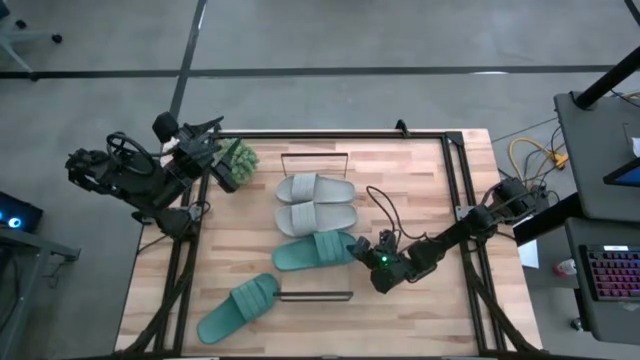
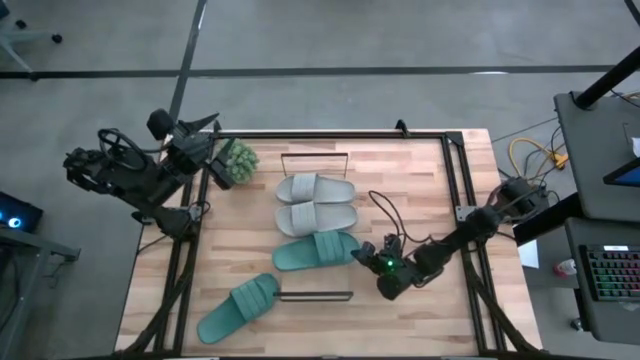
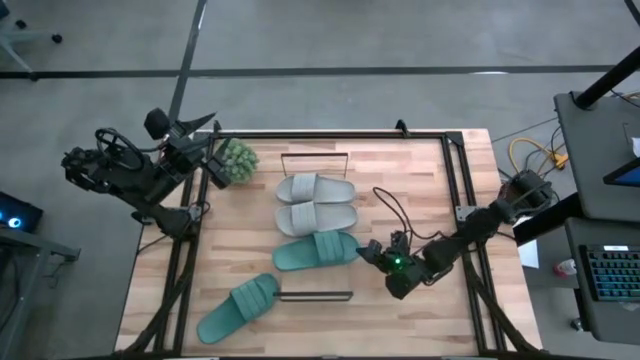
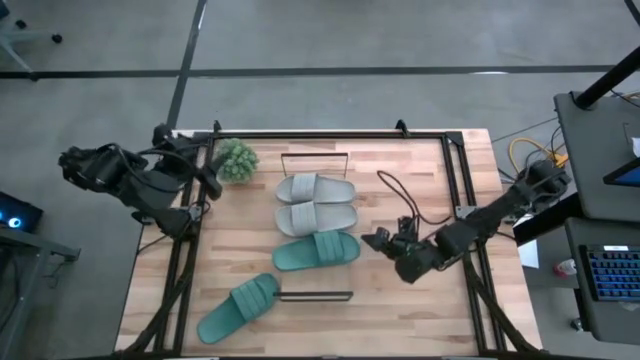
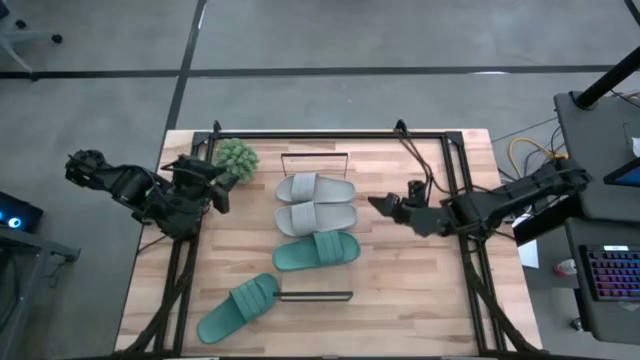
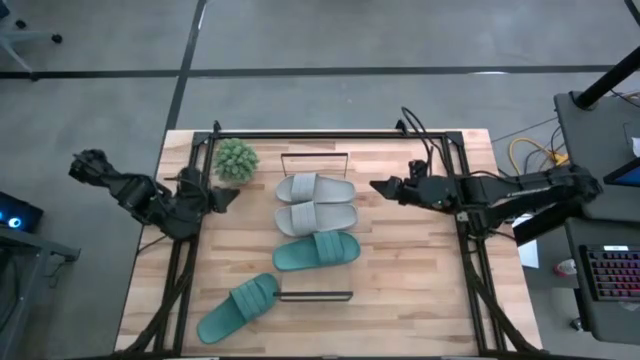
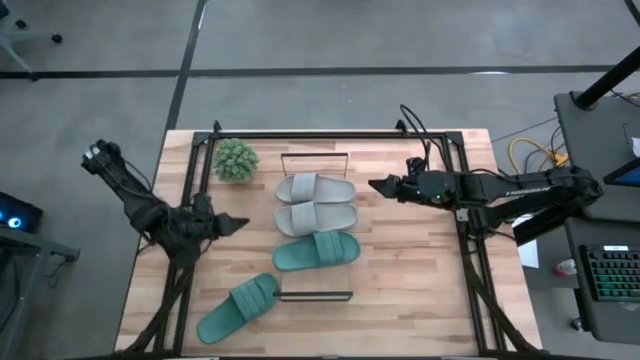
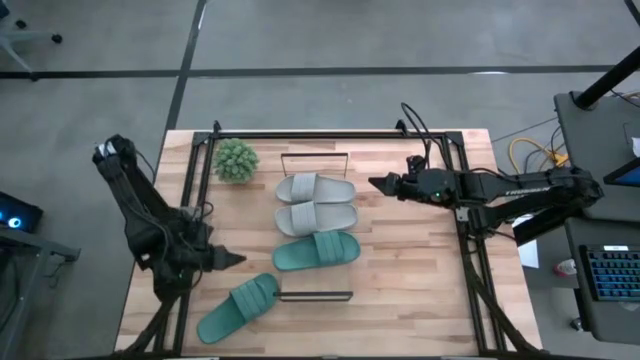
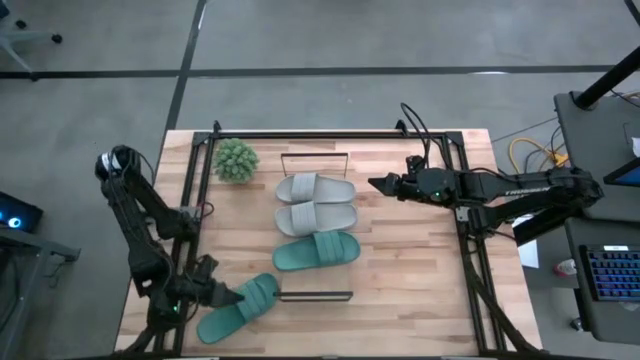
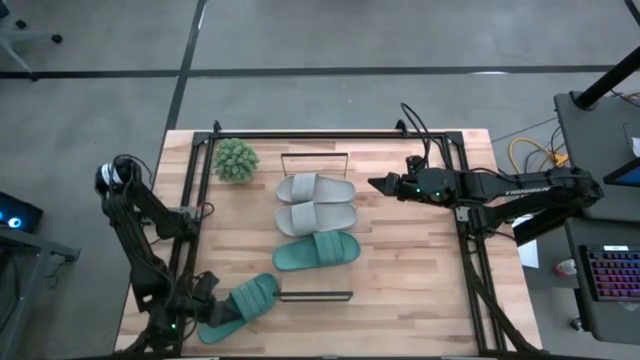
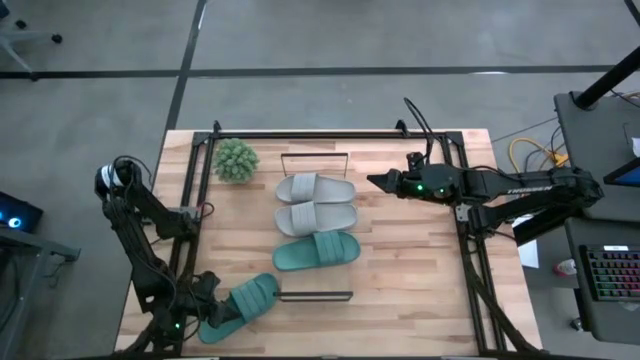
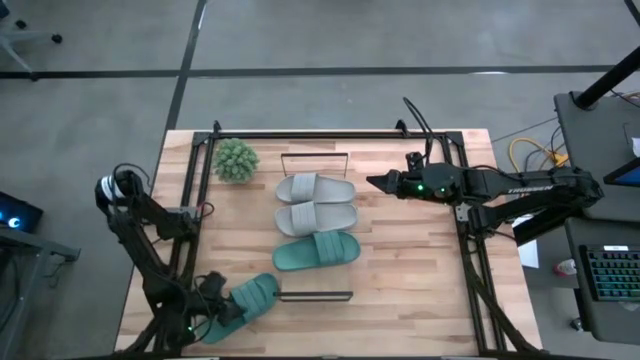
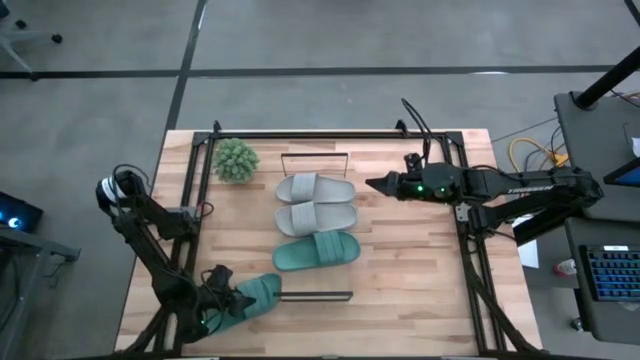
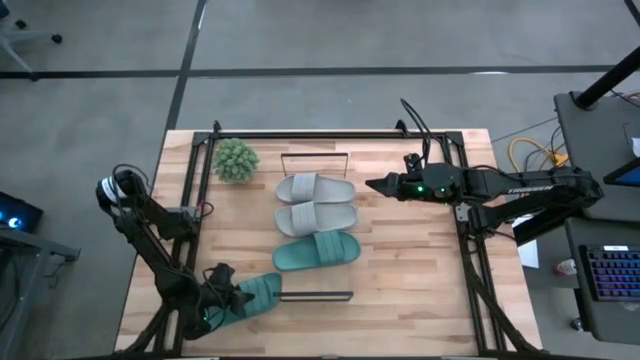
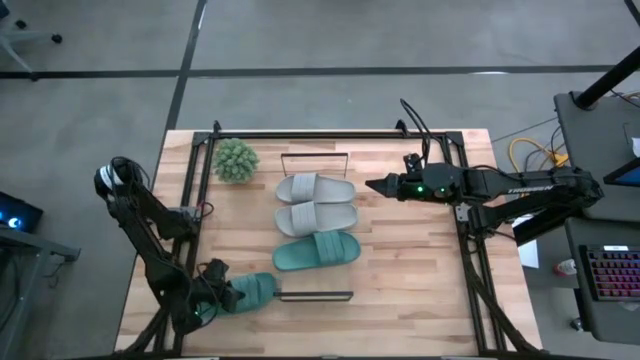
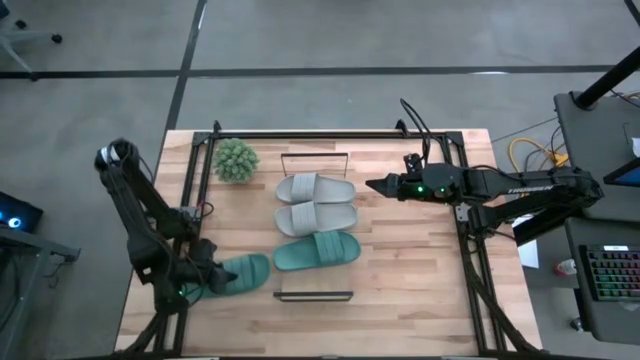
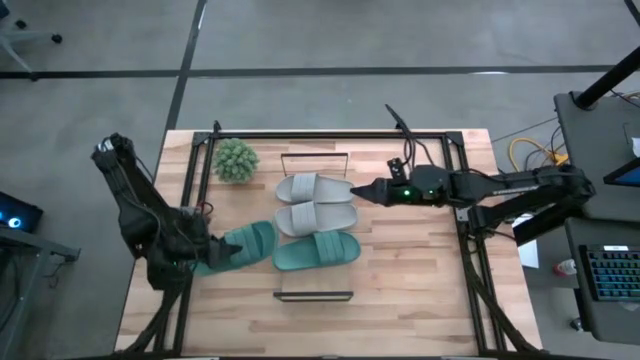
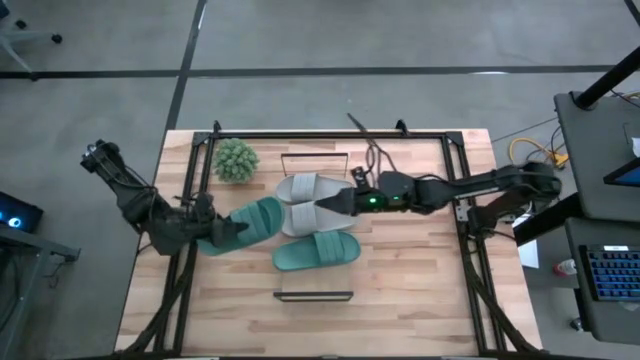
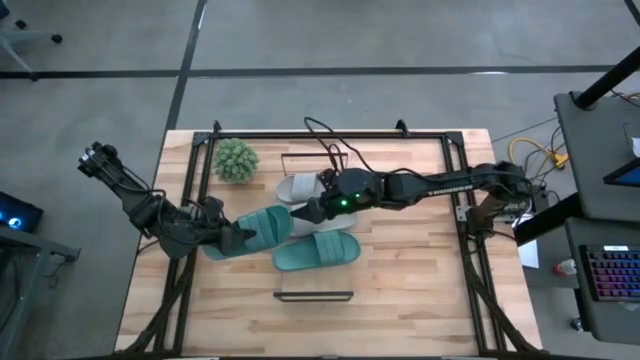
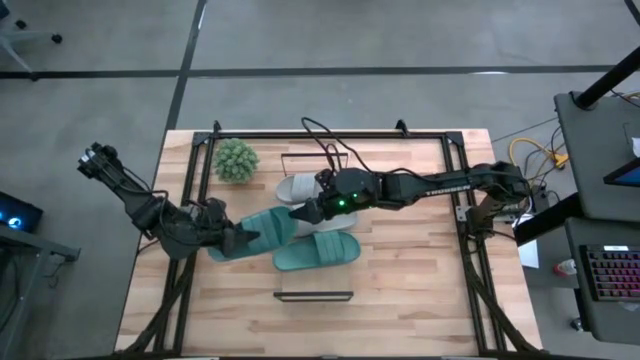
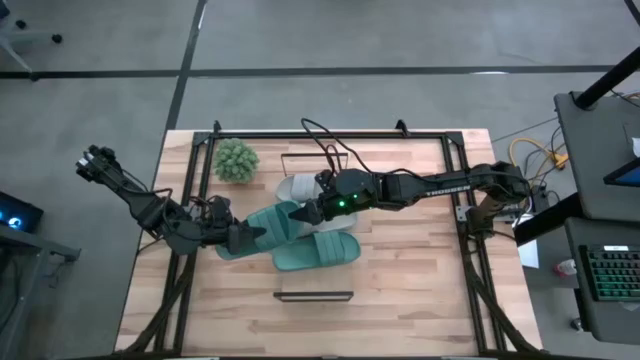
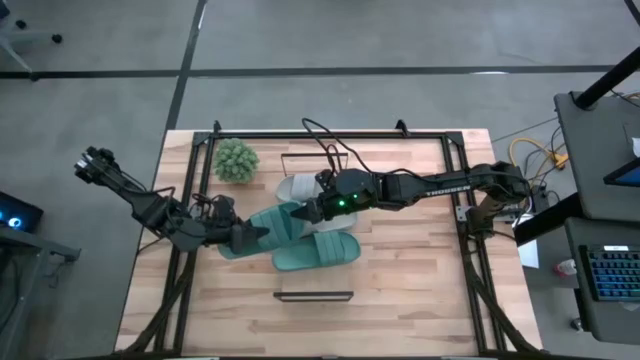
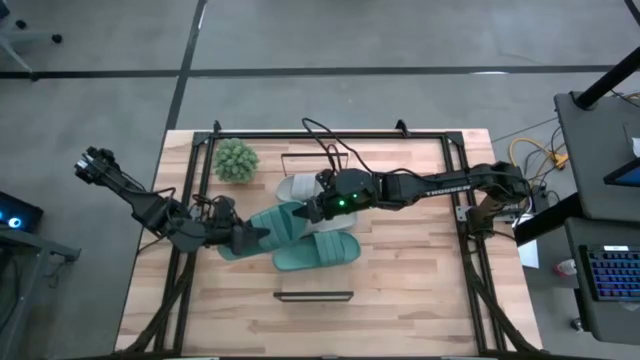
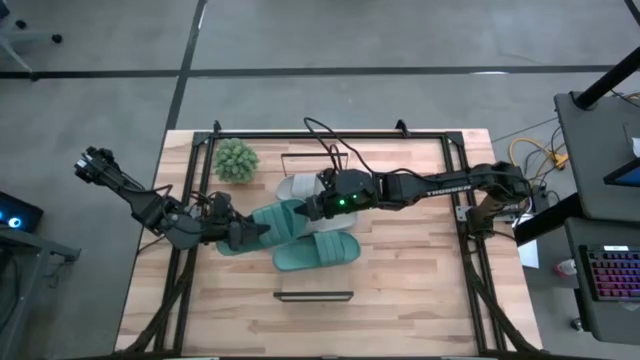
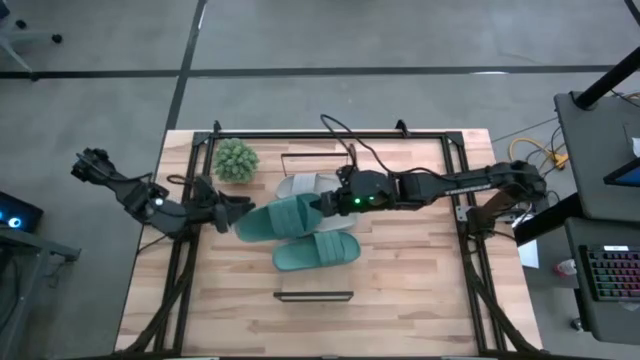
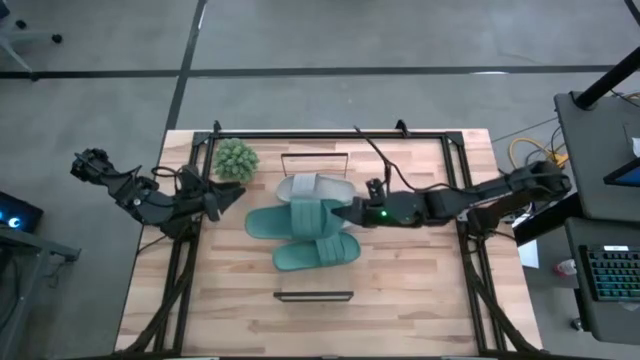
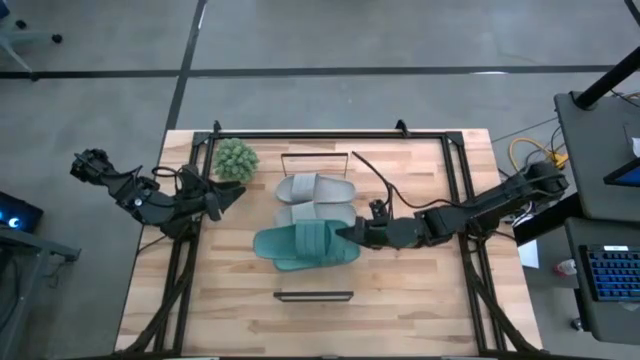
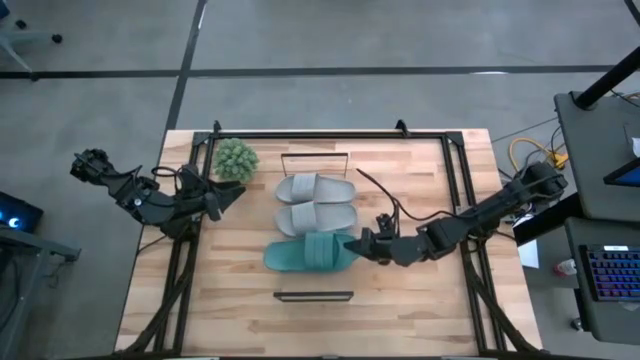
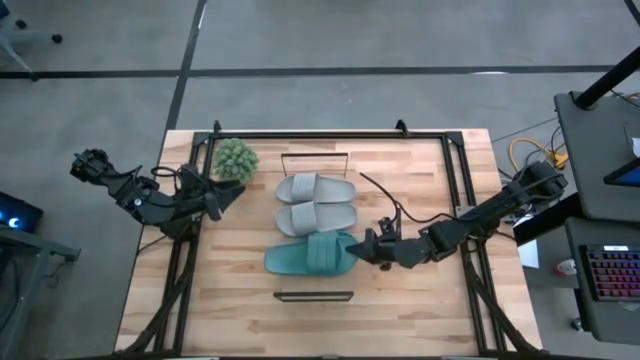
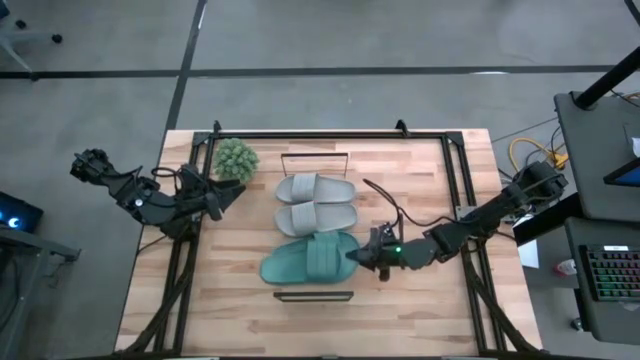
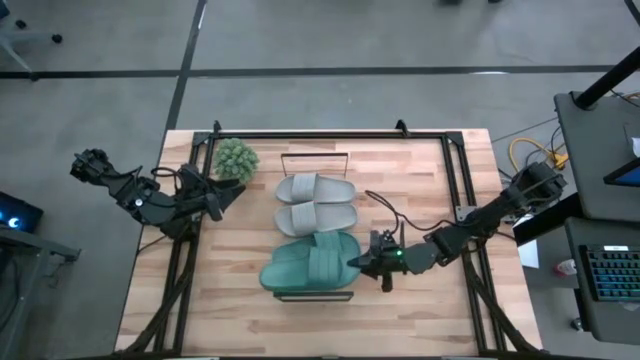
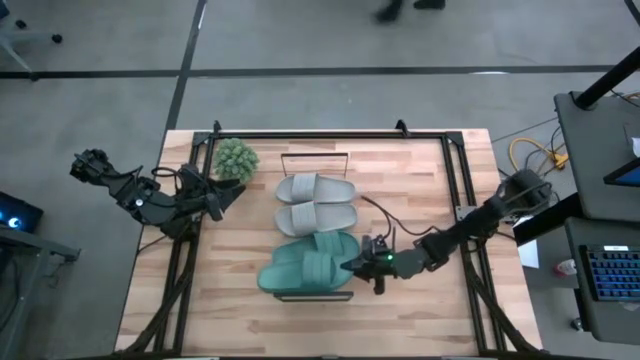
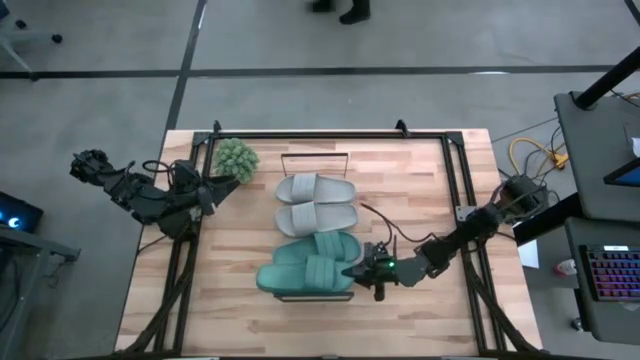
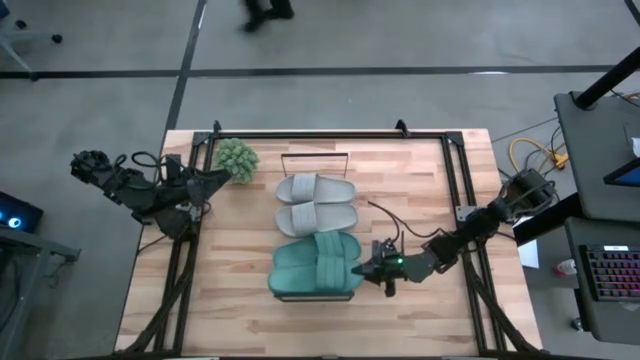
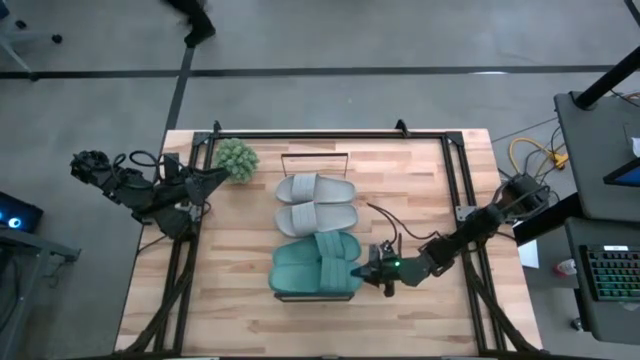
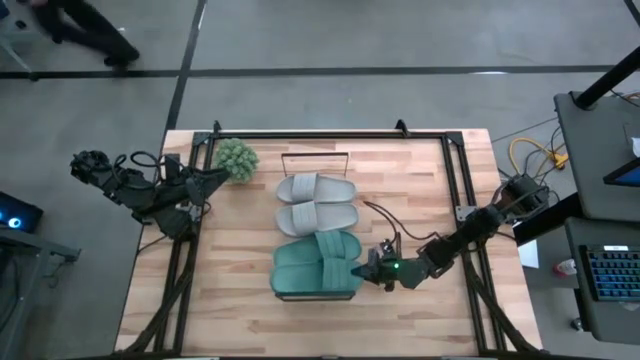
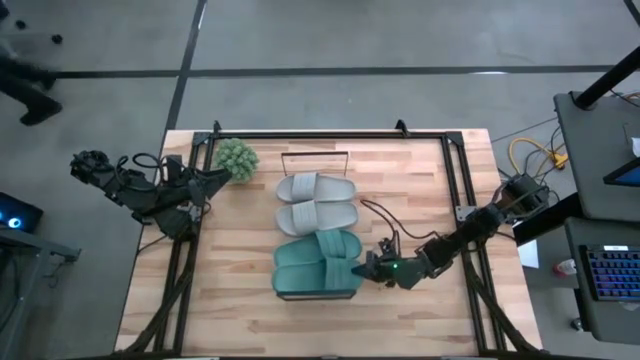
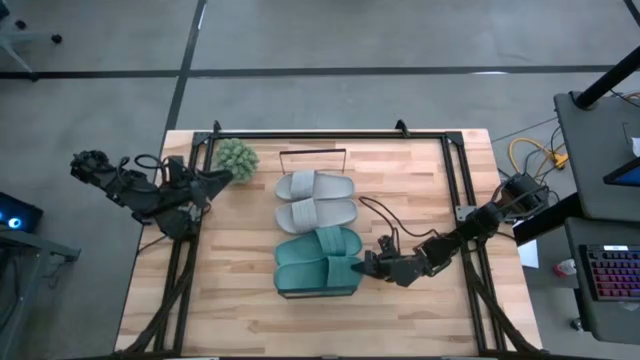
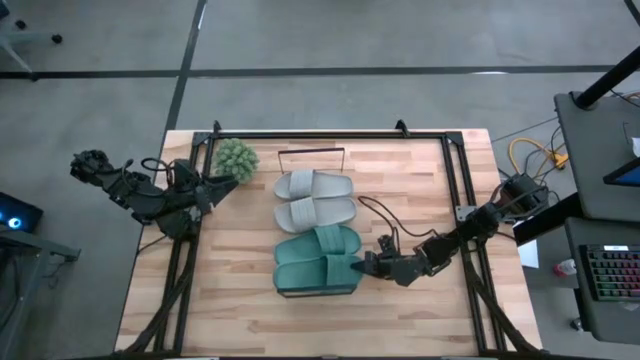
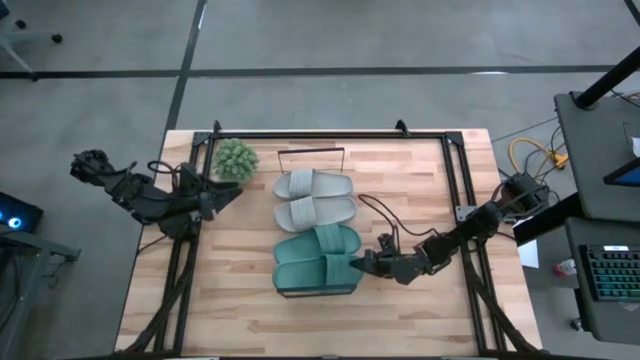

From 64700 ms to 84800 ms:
Task: Pick and place slides into the shelf
Put the green slipper on the shelf and align it with the other green slipper
